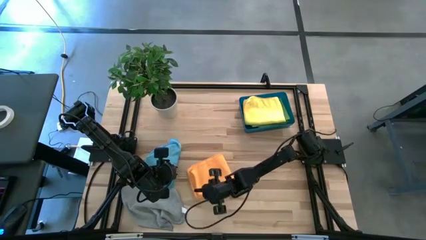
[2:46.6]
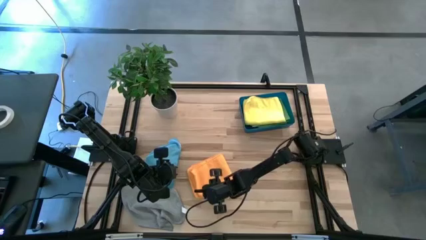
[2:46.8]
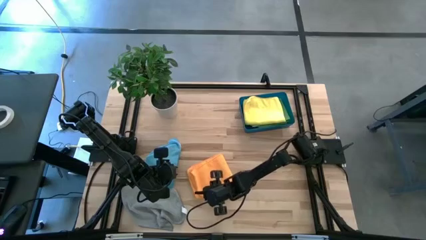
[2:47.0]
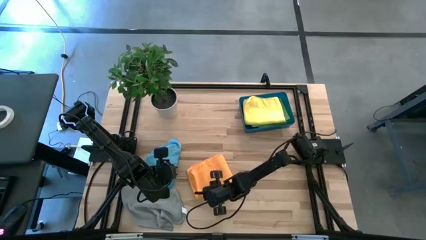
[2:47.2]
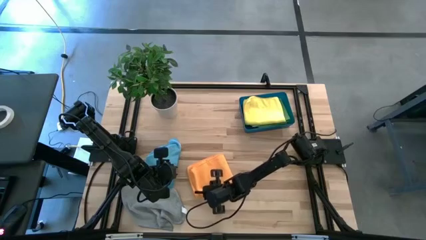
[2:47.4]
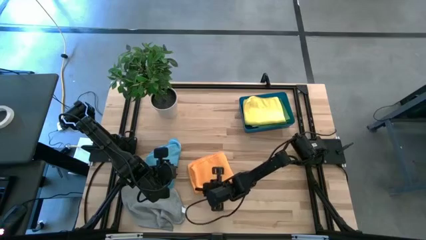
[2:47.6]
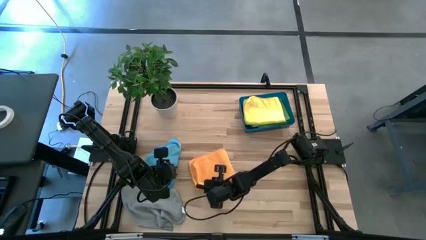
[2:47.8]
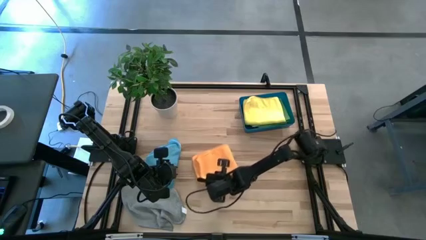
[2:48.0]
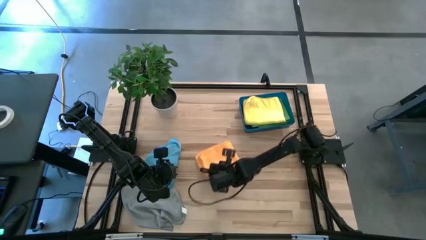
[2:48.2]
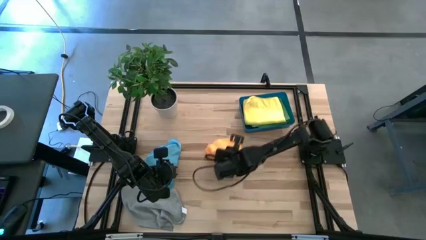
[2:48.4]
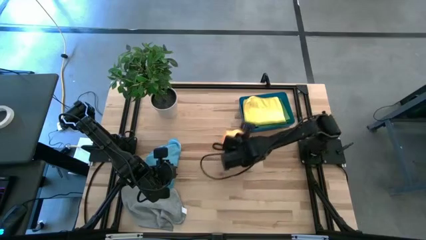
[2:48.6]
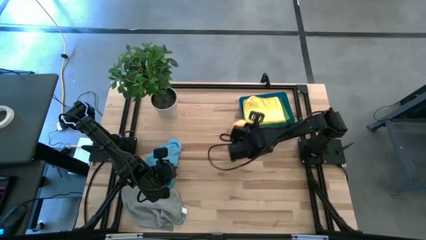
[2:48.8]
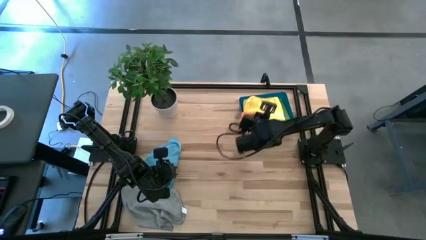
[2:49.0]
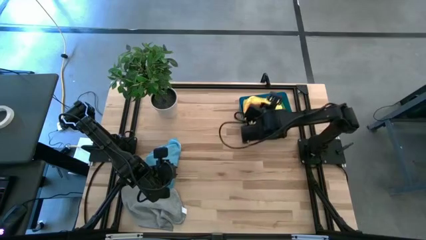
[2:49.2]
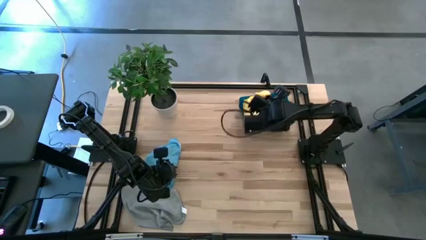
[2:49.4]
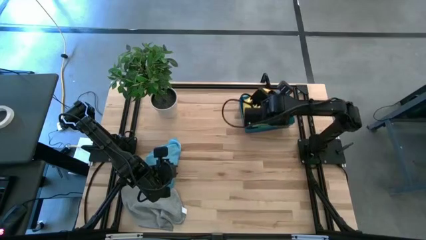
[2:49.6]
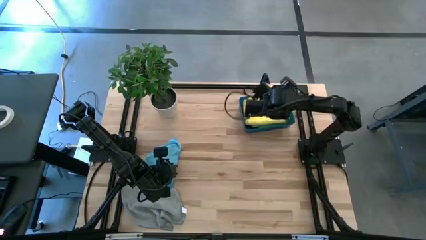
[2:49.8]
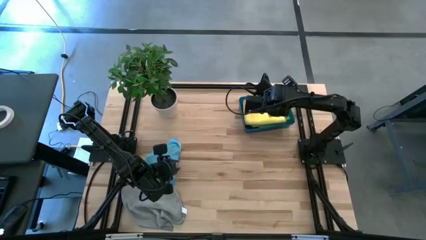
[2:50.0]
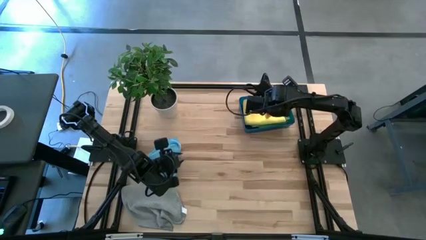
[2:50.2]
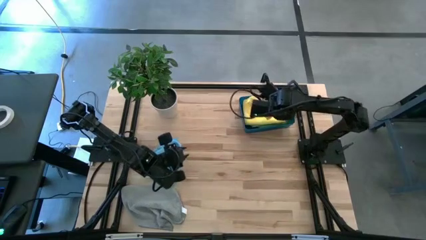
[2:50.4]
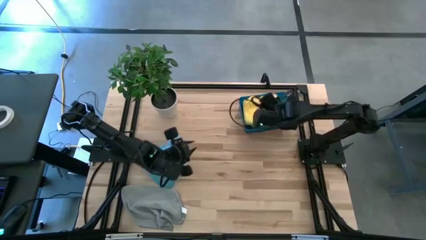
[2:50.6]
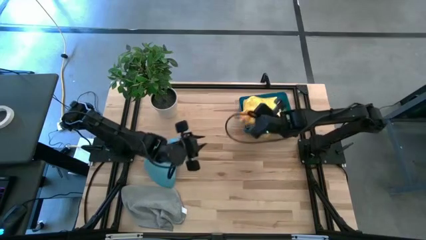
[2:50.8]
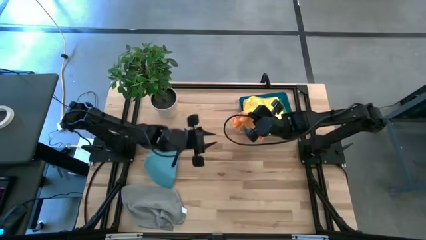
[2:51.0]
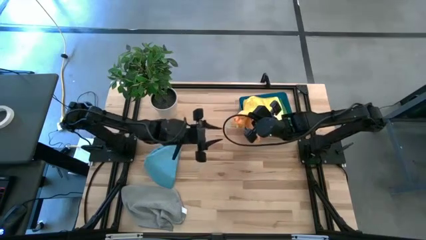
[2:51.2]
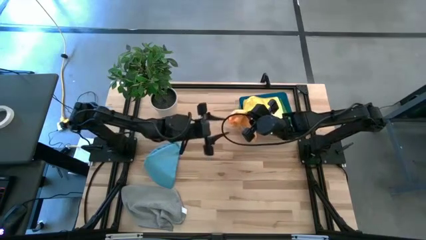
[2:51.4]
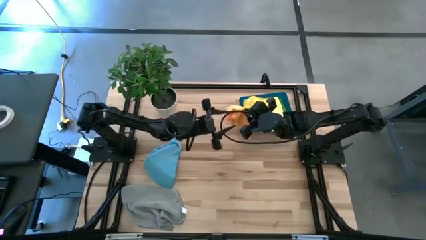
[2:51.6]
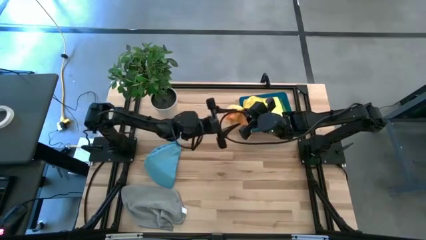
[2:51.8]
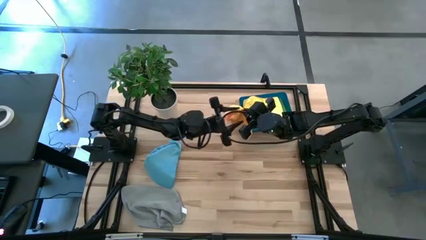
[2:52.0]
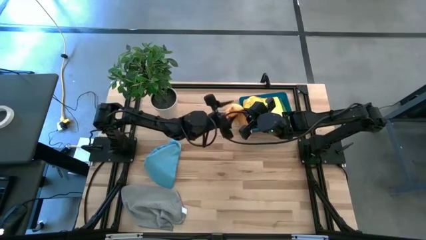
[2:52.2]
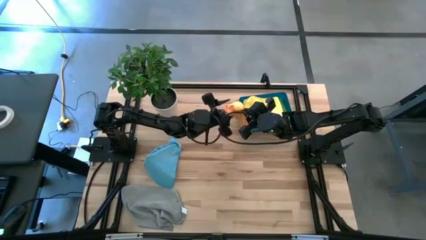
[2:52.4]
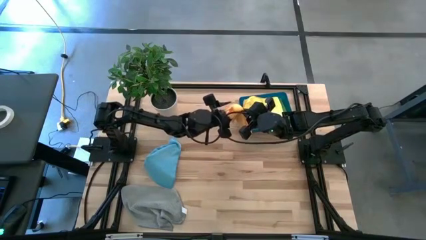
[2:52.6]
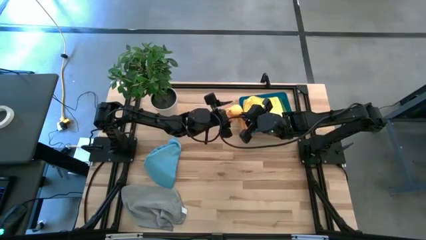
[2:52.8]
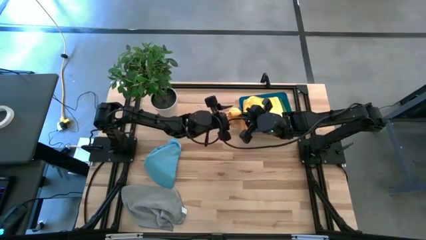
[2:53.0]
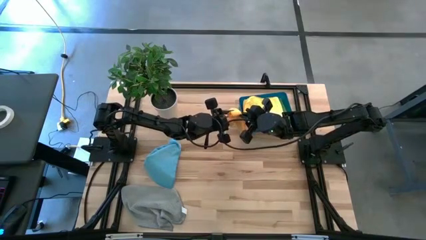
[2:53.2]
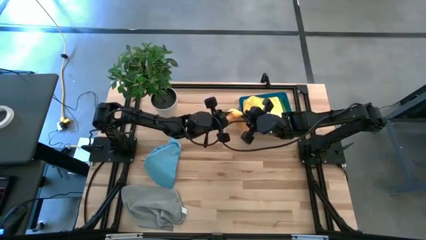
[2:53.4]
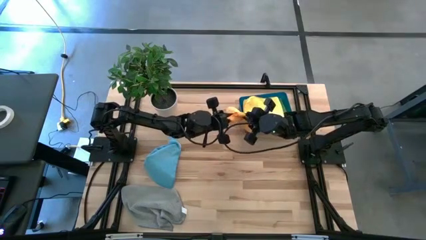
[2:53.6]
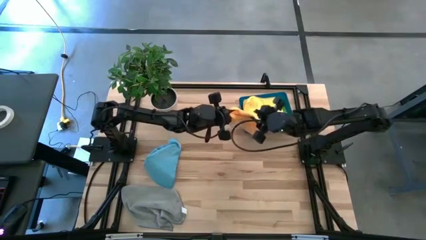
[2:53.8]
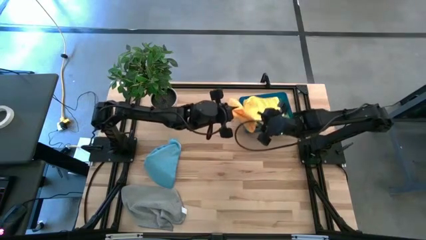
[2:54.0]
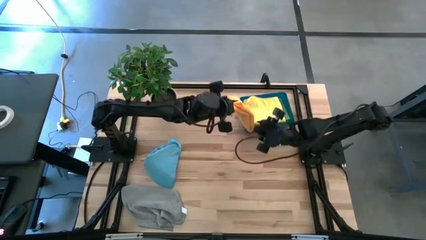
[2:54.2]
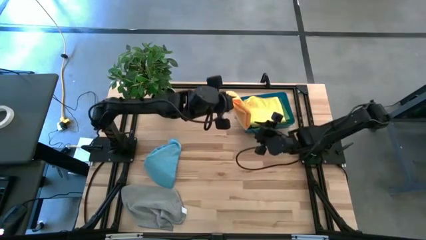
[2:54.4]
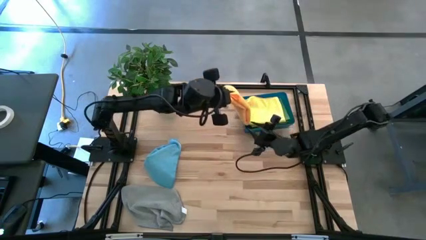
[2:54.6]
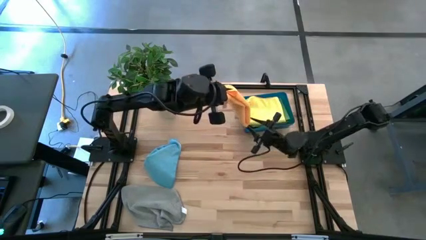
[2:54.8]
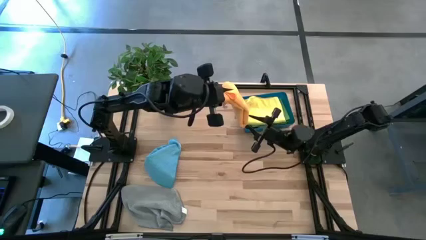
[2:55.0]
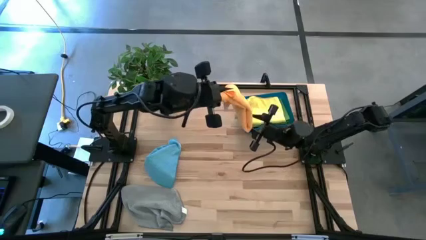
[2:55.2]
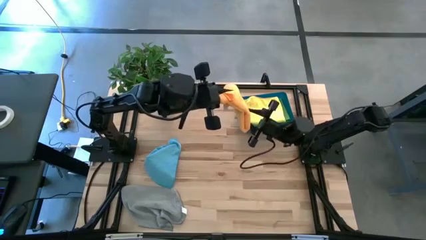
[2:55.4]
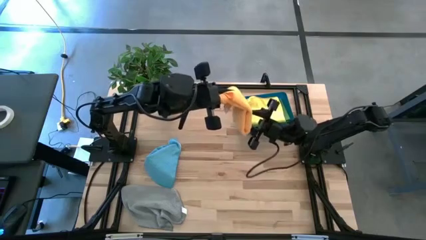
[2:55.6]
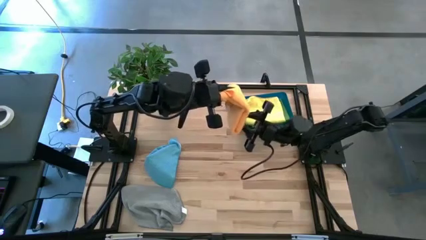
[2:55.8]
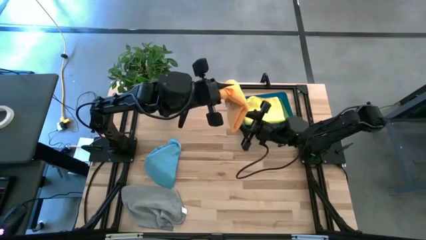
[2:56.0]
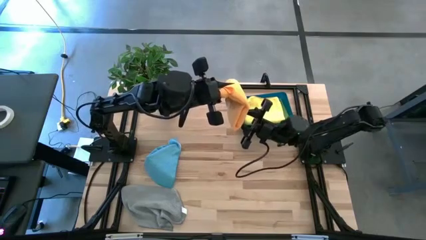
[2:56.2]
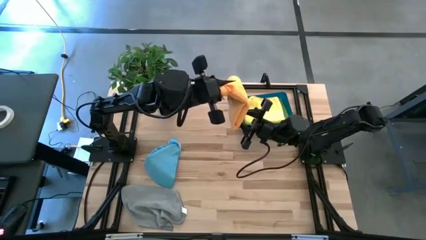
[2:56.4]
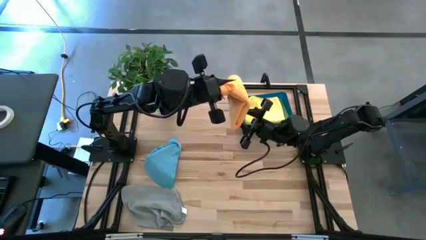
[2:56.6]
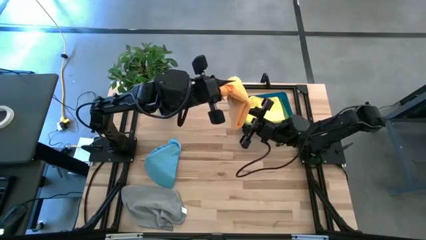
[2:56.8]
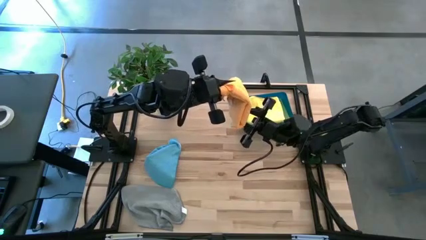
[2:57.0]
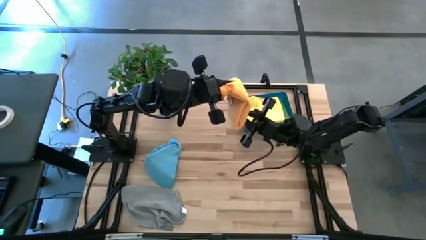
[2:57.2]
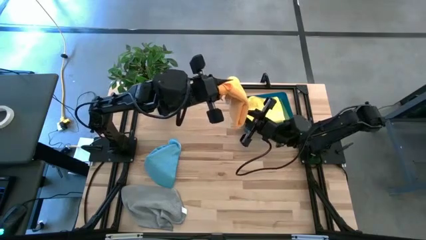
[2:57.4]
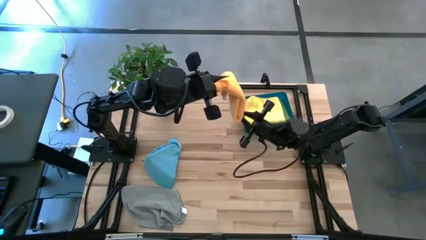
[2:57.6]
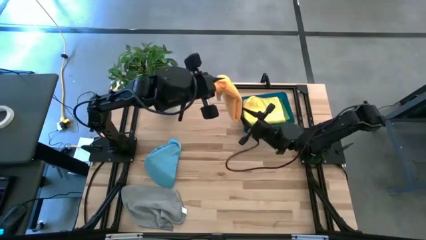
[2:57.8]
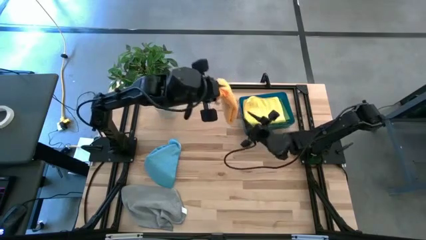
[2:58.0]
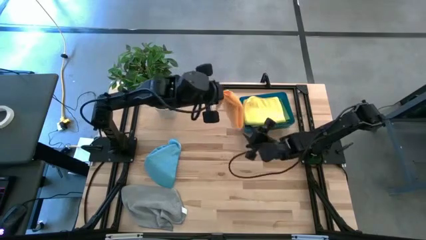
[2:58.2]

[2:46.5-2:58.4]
Task: Fold microfiber towels
Put the orange microfiber cloth into the blue bin

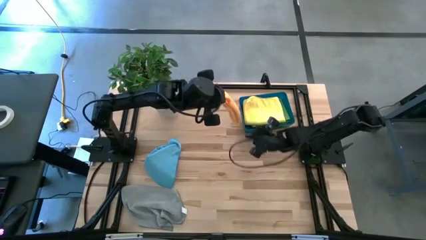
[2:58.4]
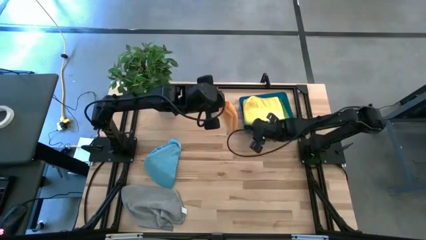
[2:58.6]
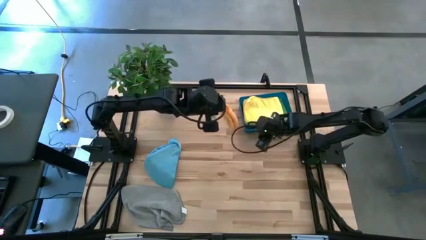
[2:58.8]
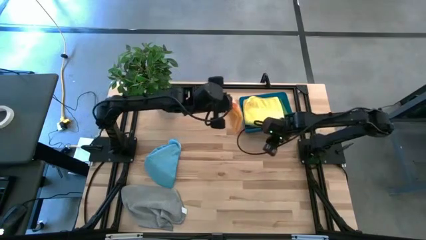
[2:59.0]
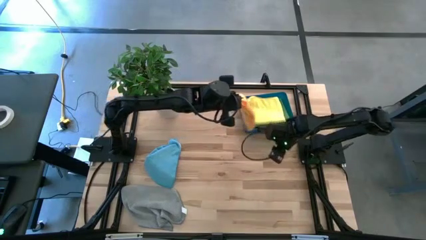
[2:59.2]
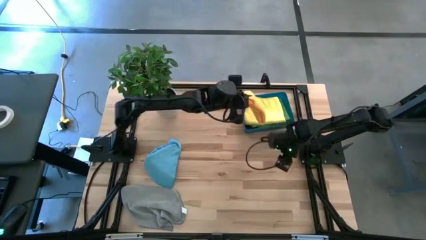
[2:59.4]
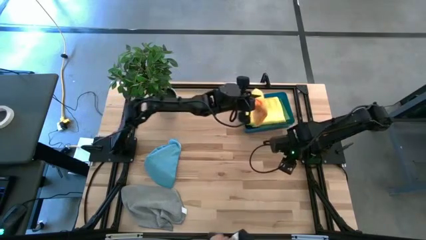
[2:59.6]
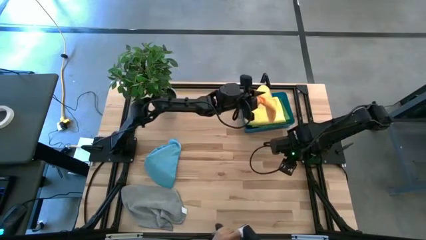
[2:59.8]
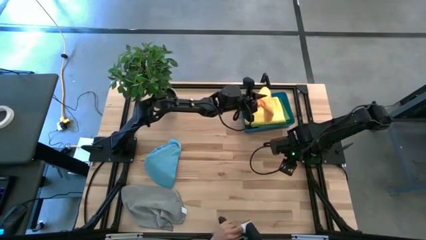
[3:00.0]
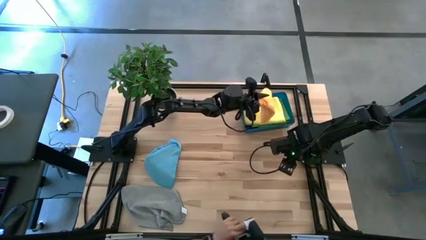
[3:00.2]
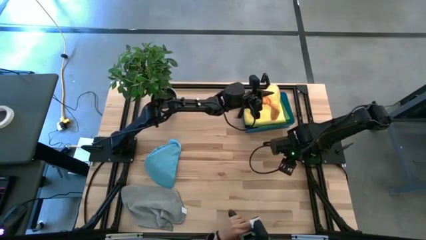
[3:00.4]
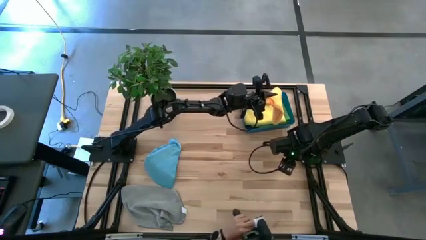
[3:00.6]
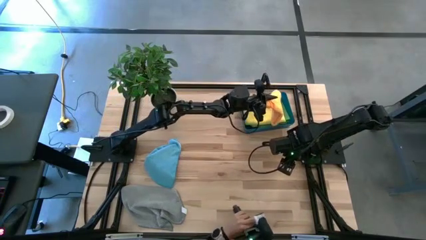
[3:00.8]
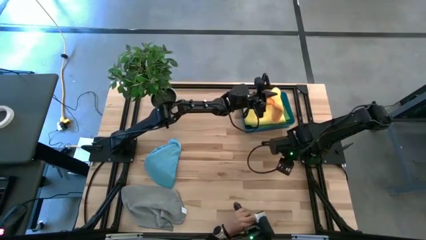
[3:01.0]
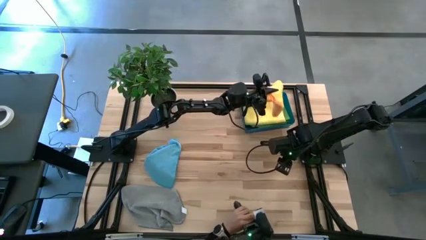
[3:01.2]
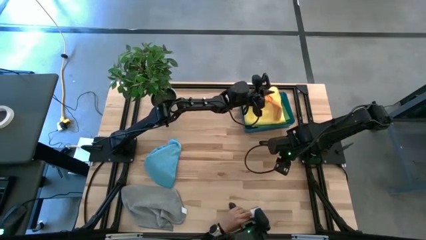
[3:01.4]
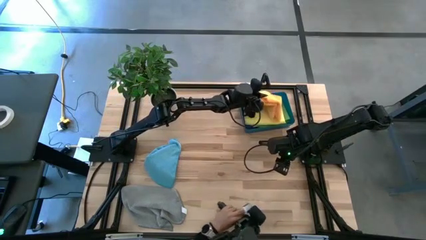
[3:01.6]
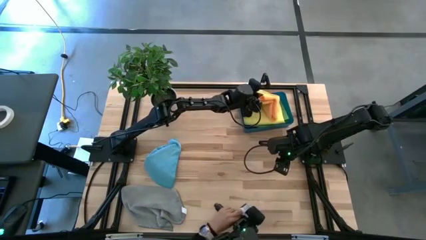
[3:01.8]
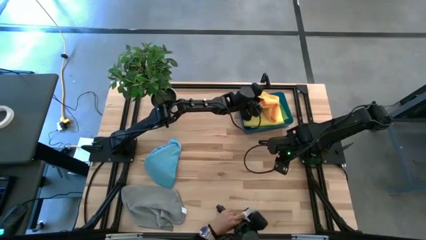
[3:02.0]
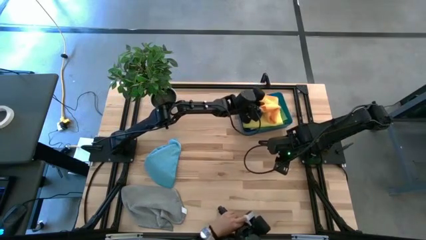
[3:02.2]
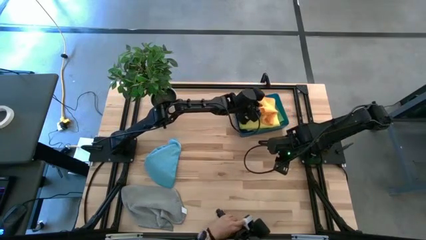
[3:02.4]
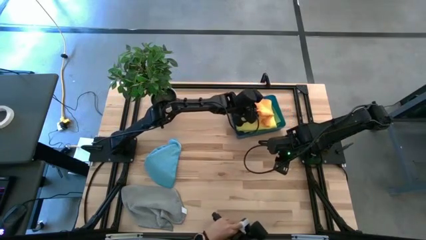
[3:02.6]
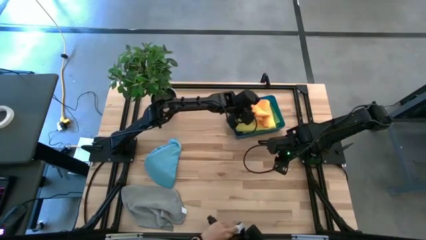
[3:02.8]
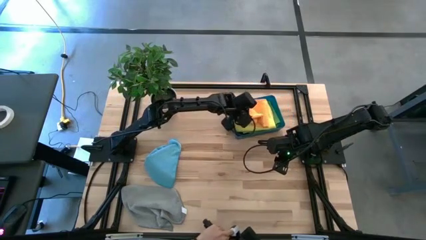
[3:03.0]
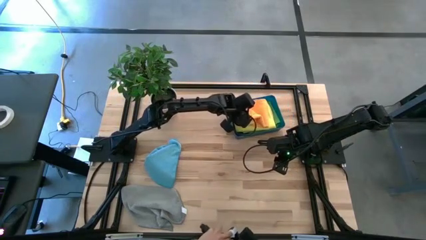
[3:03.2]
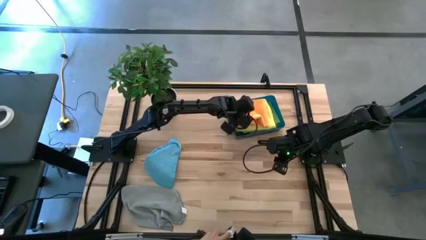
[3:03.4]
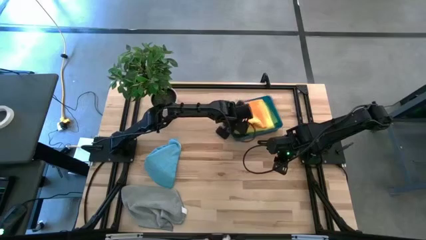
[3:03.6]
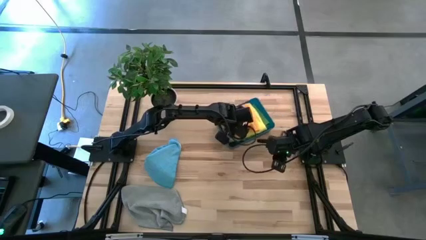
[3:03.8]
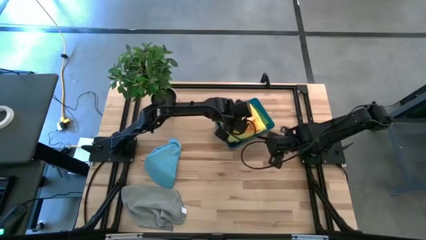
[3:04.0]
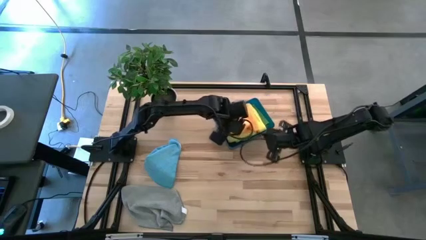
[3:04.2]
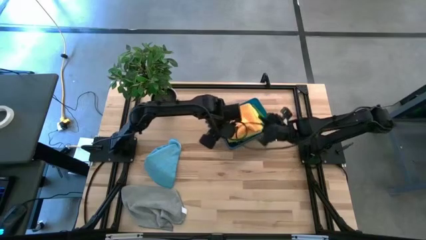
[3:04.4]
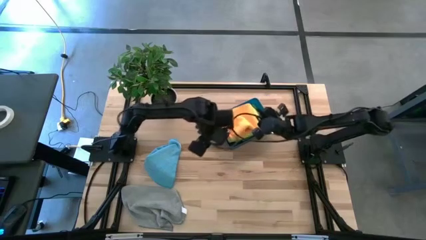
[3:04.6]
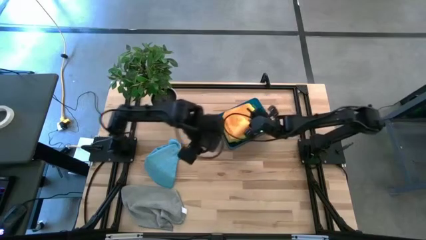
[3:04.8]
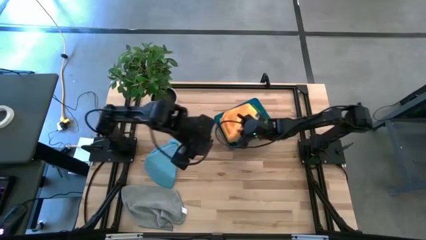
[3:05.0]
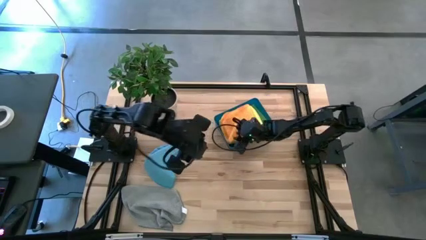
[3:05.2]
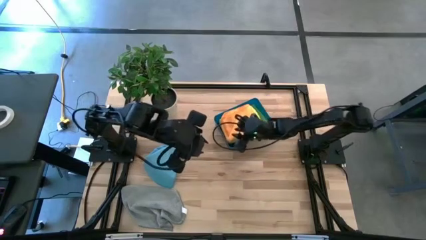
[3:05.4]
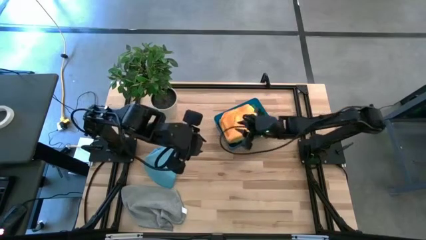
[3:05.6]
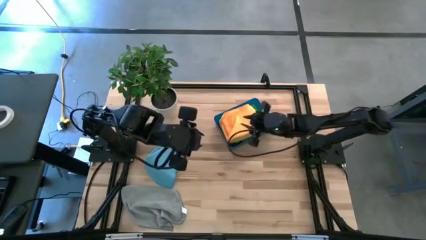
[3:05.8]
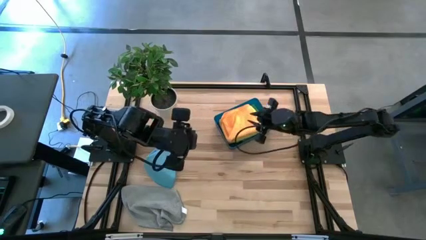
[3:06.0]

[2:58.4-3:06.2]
Put the orange microfiber cloth into the blue bin
